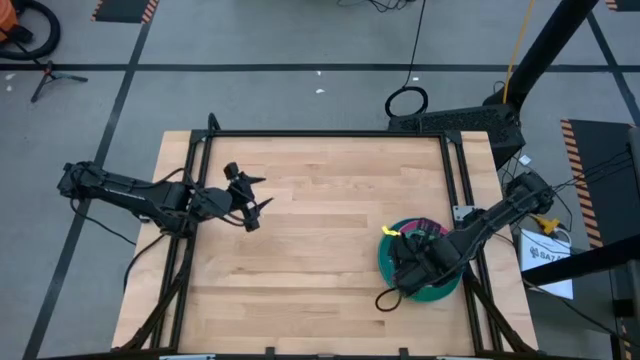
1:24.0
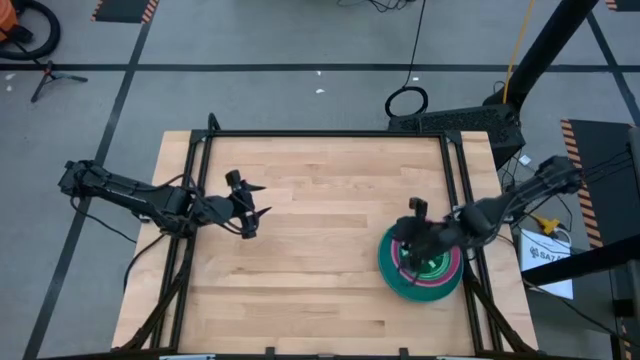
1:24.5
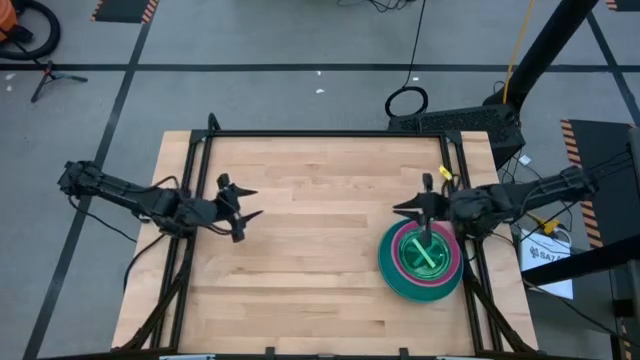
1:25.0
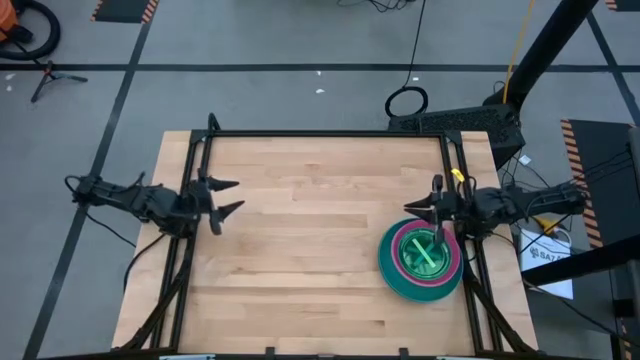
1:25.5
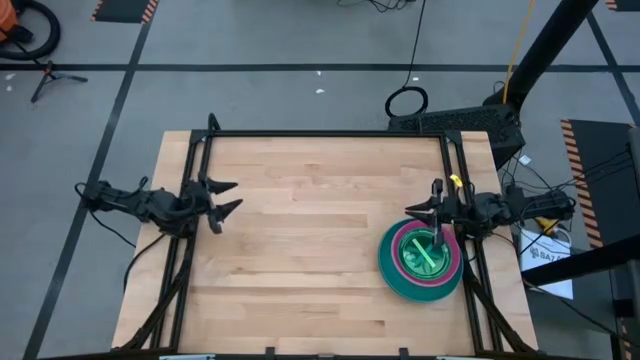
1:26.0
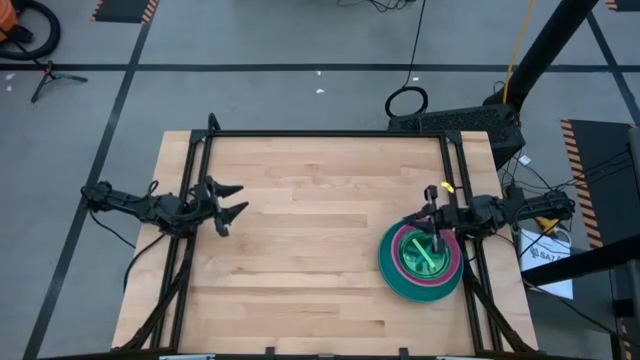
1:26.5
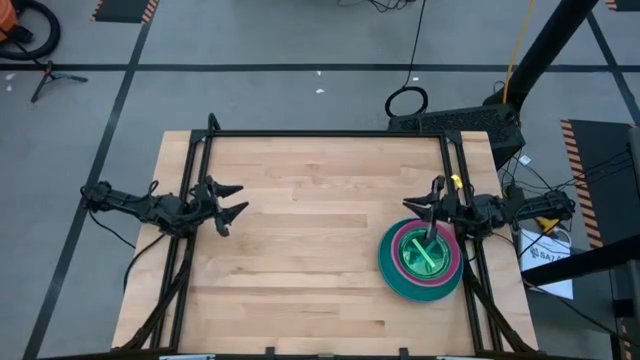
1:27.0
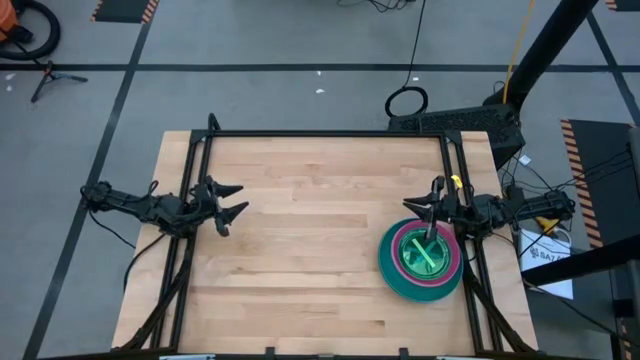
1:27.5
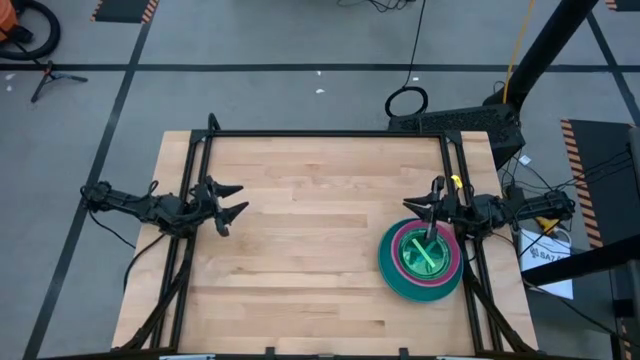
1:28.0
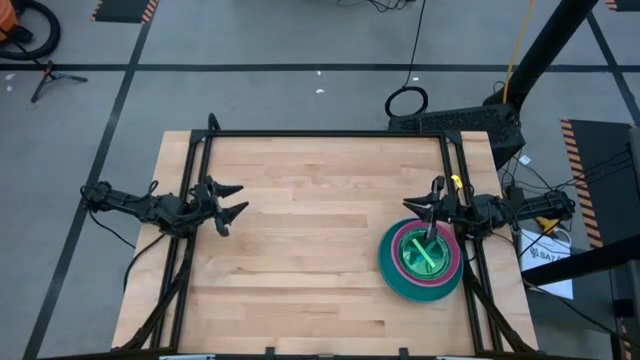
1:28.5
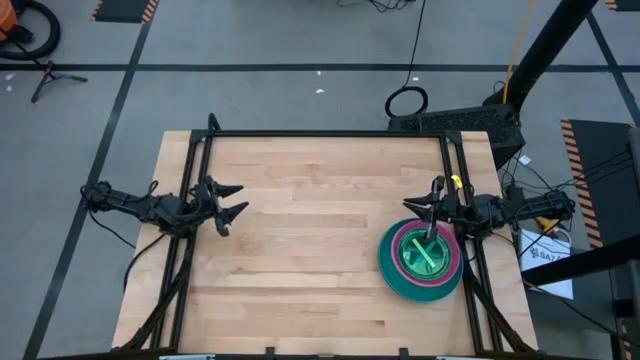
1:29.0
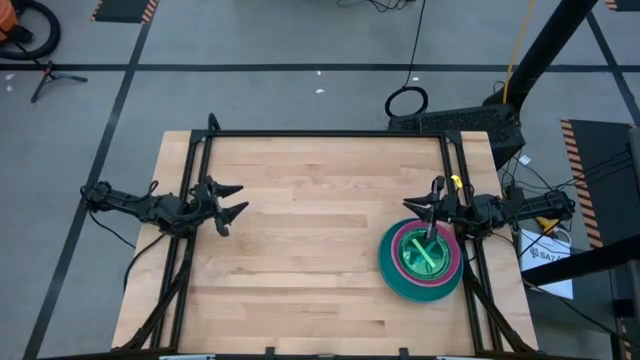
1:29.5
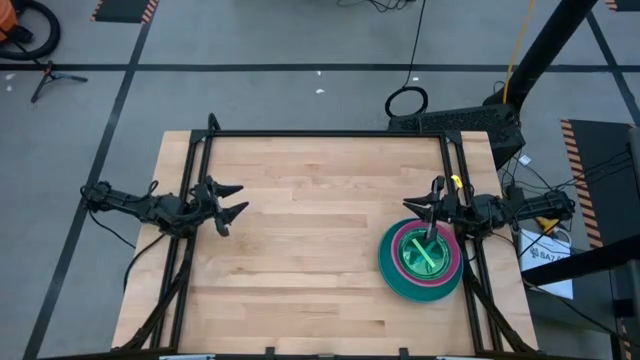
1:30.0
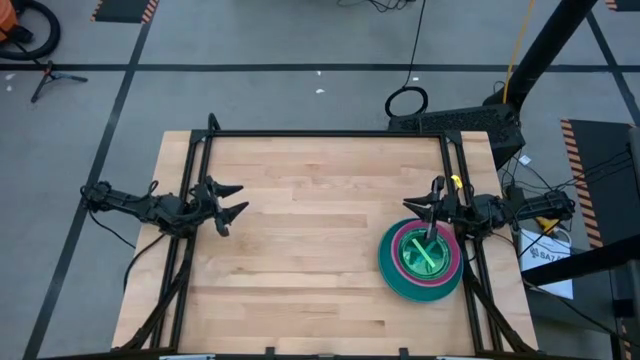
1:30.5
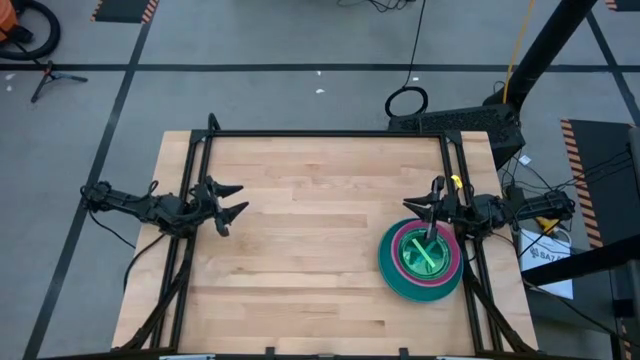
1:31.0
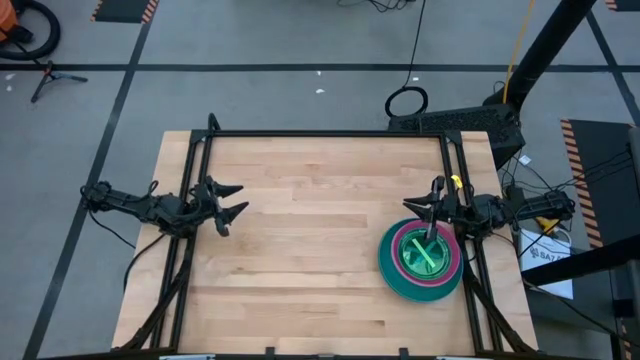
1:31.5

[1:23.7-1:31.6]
Task: Stack plastic plates
Return to Home Position

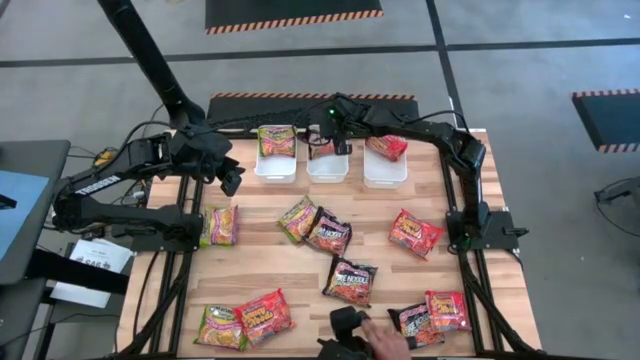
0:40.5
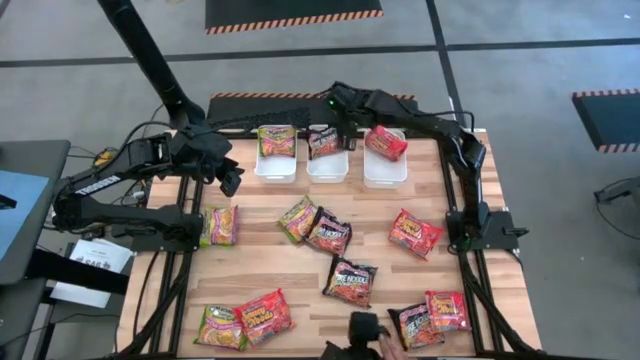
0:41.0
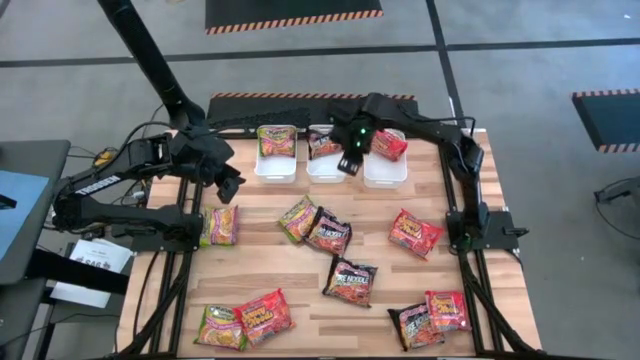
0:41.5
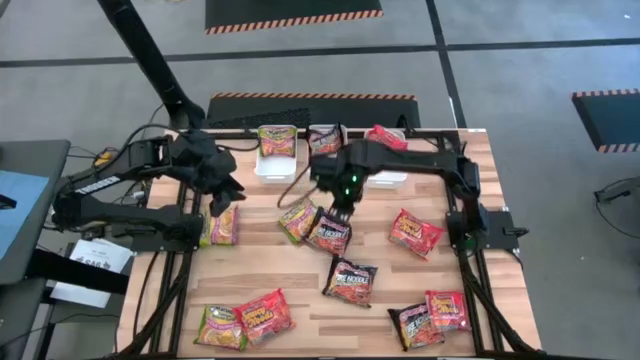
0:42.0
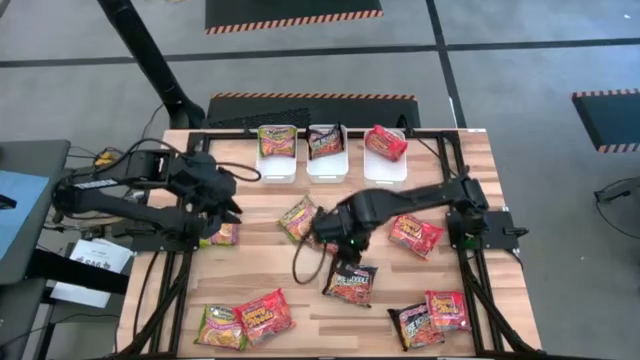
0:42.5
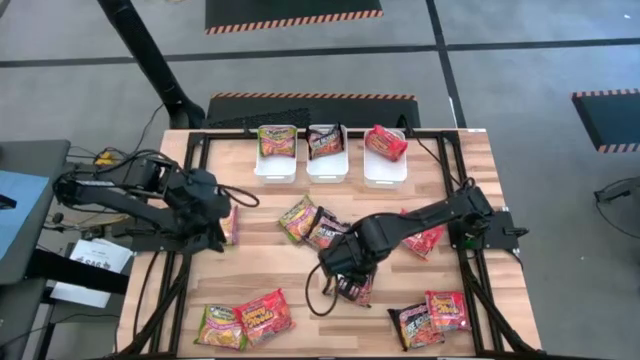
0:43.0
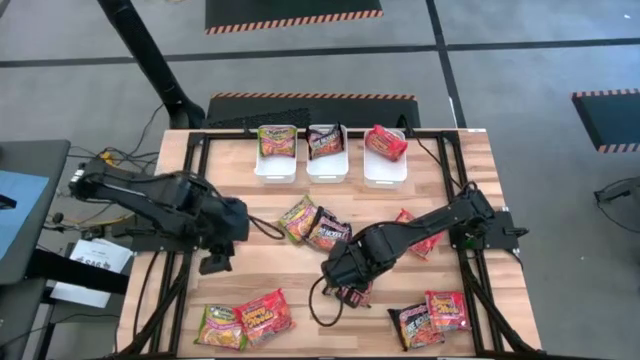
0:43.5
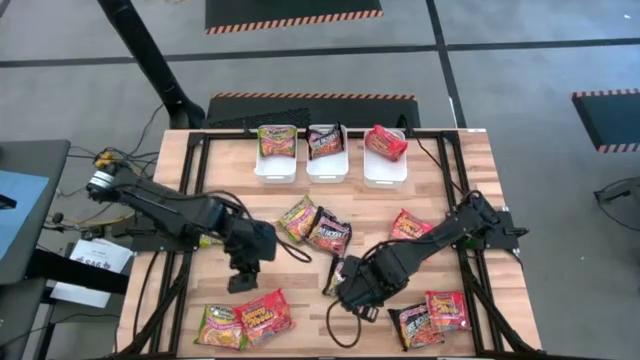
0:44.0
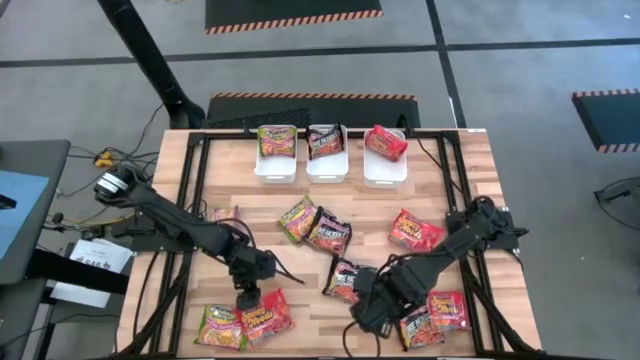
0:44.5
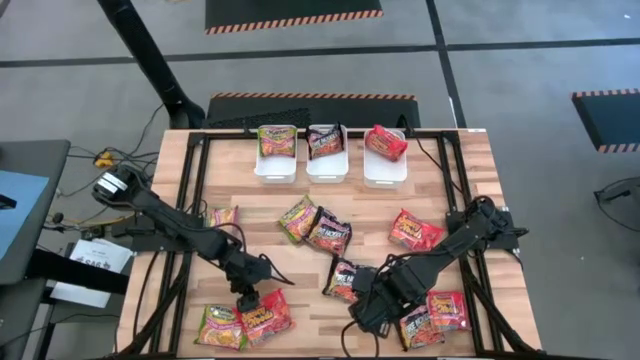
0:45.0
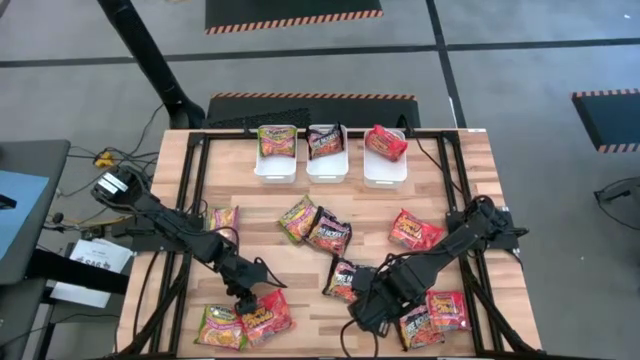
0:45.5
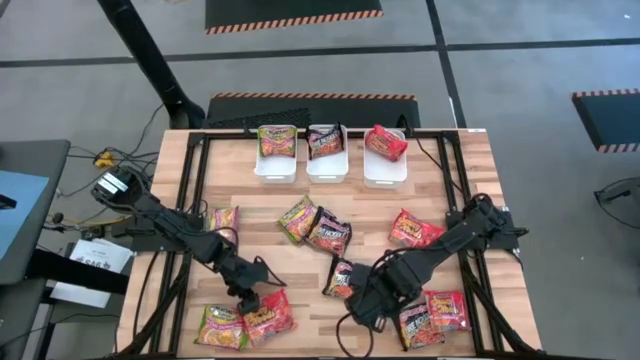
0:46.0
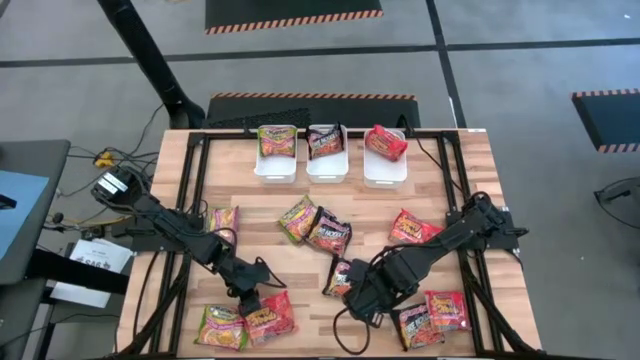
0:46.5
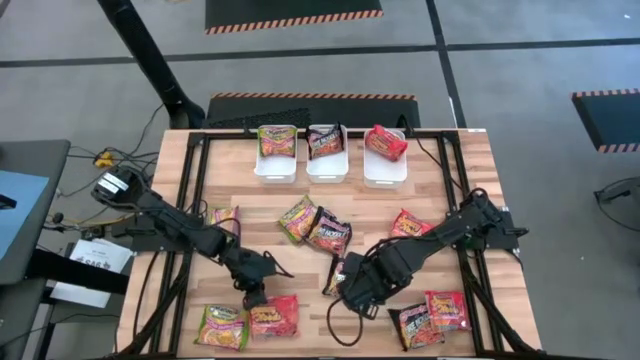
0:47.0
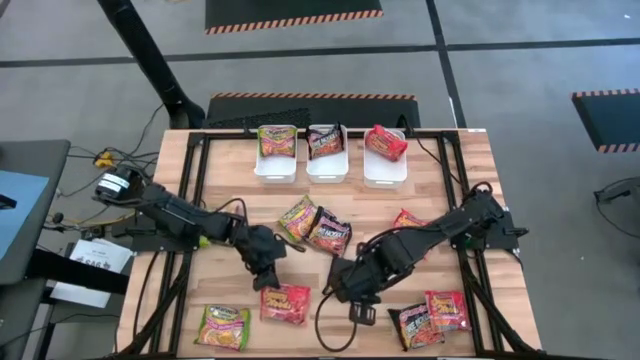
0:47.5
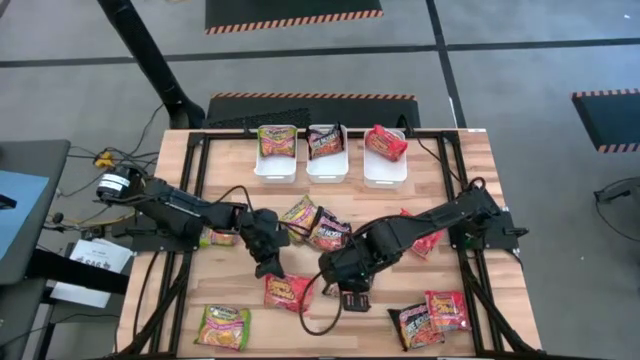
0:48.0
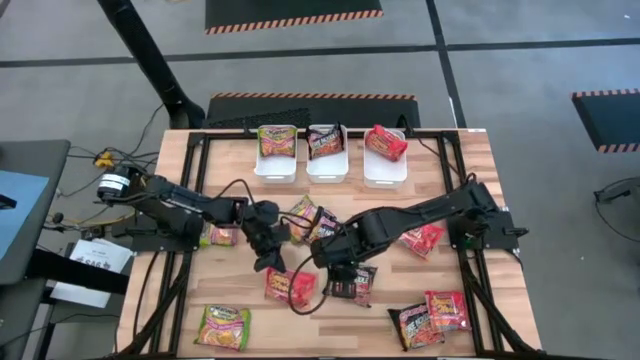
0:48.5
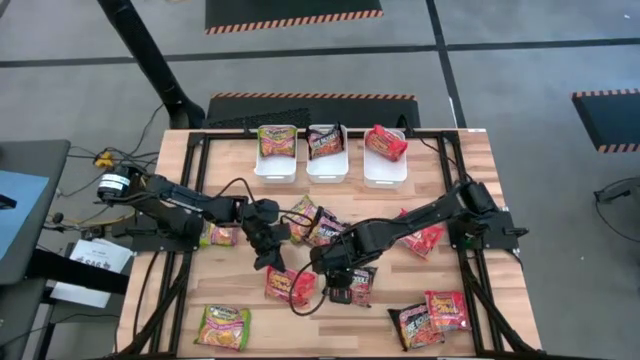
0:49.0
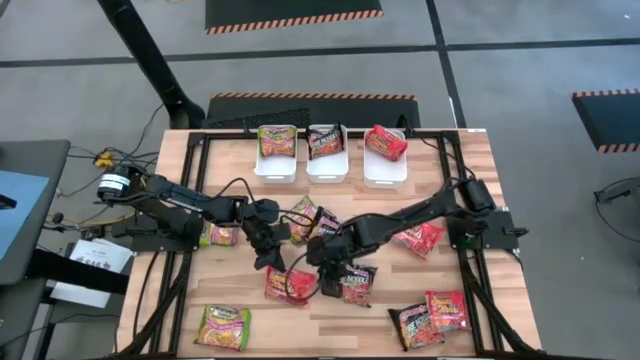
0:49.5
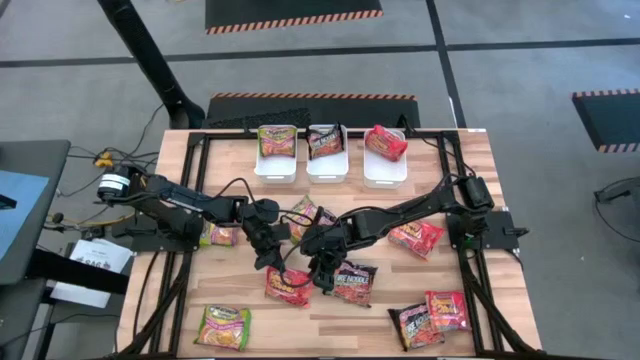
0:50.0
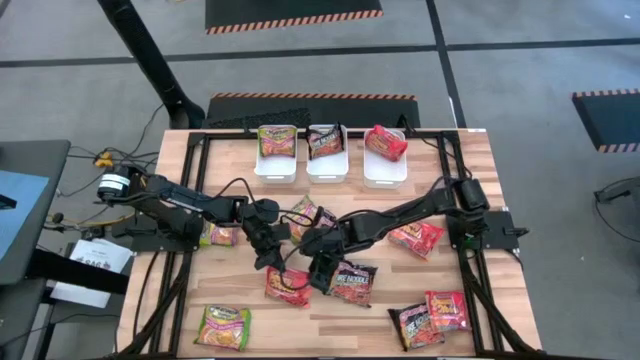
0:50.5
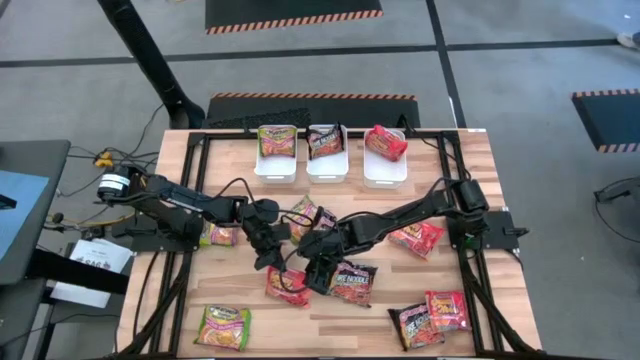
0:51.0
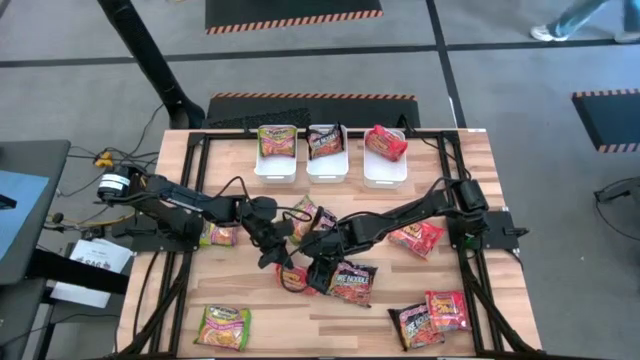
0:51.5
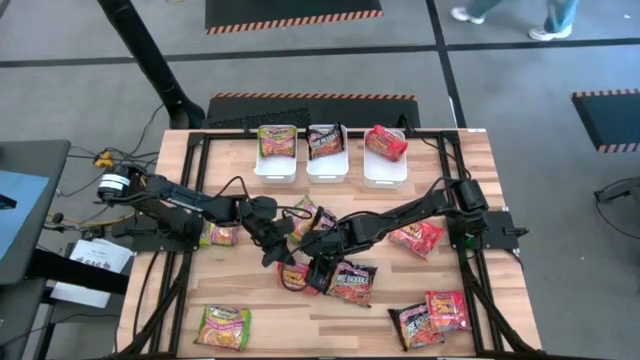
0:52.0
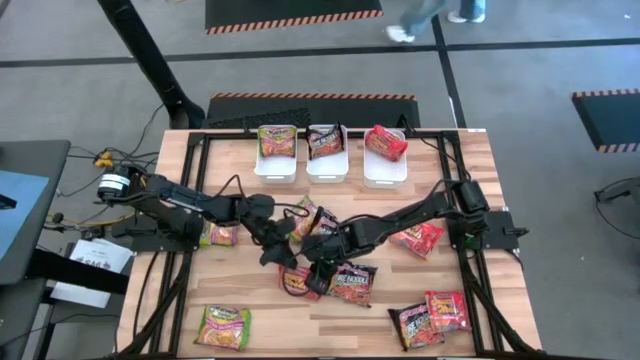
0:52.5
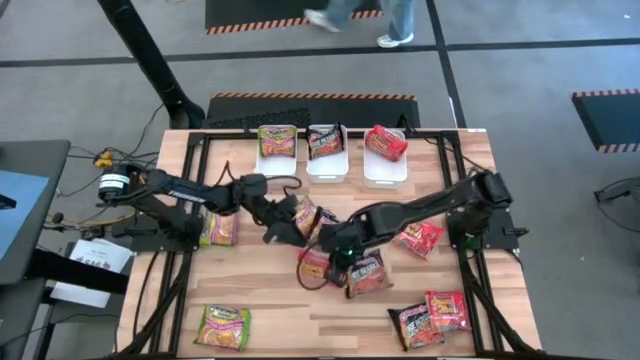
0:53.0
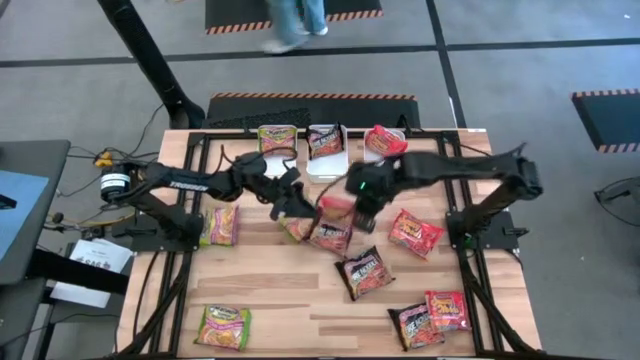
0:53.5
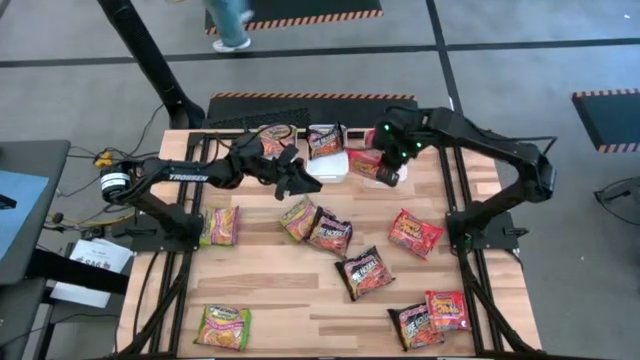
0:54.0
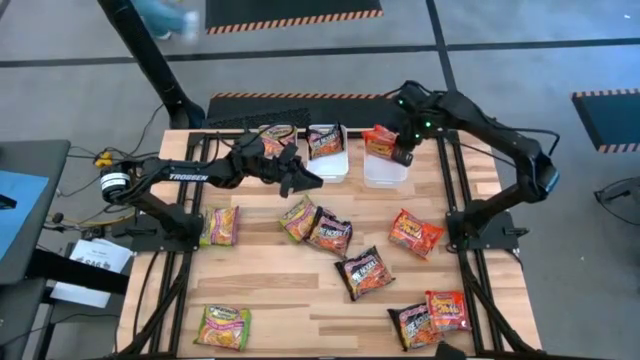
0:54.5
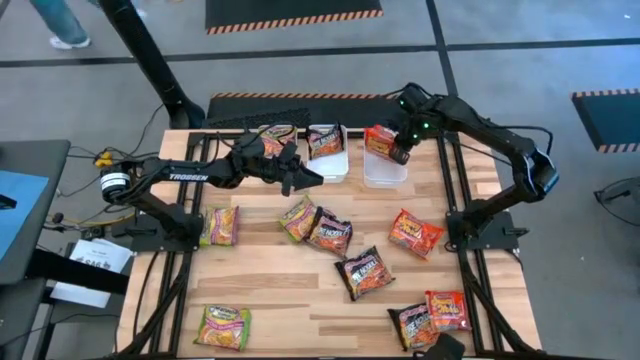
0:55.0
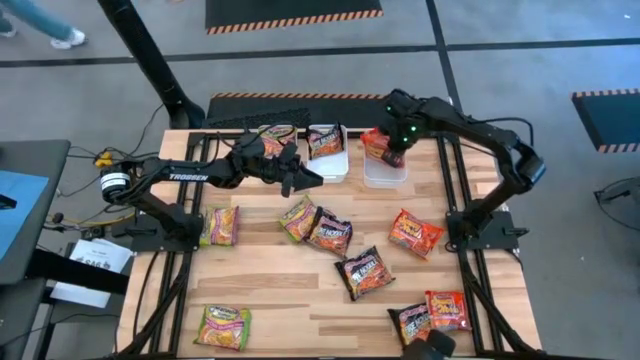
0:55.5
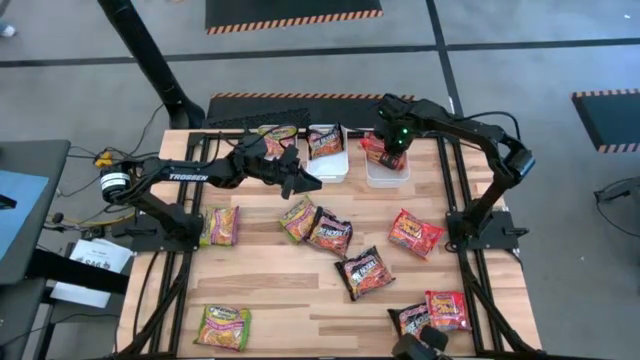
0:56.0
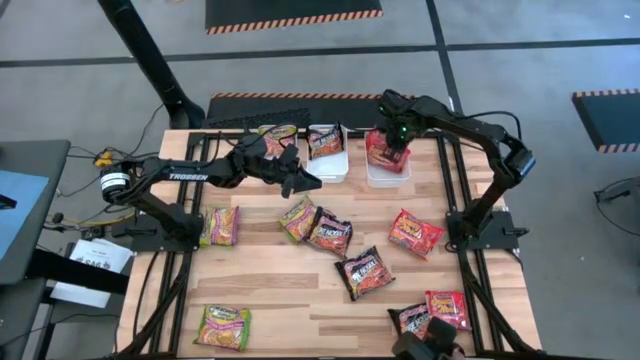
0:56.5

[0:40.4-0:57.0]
Task: Sort Maruchan noodles
Put the orange noodle pack into the right white bin
